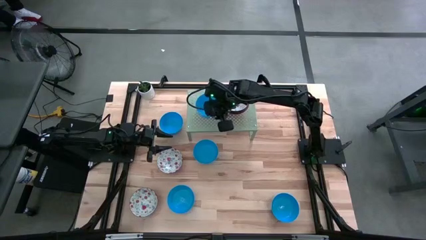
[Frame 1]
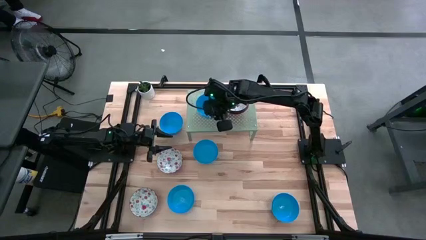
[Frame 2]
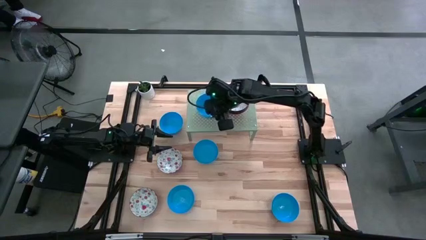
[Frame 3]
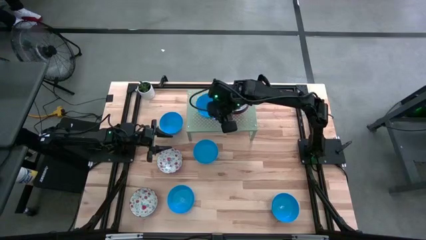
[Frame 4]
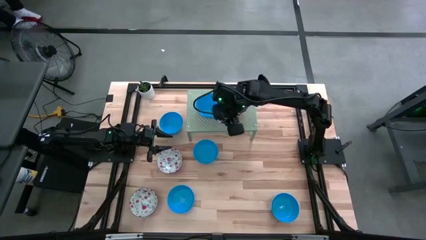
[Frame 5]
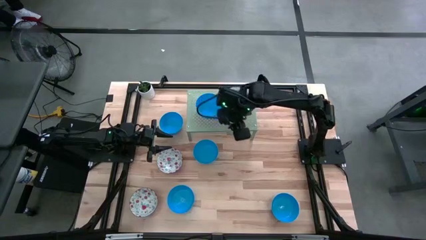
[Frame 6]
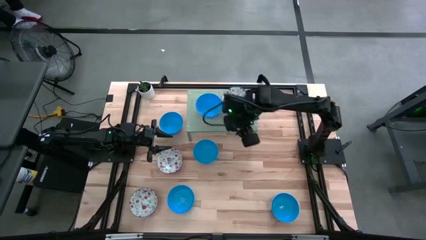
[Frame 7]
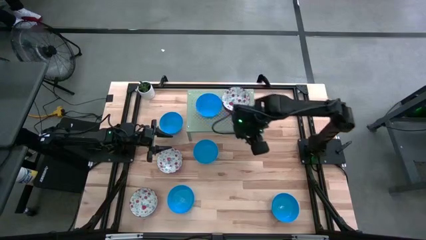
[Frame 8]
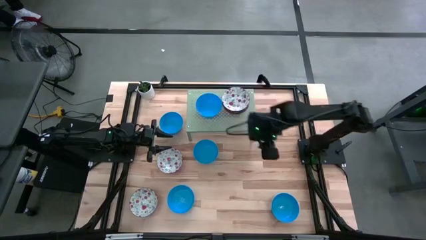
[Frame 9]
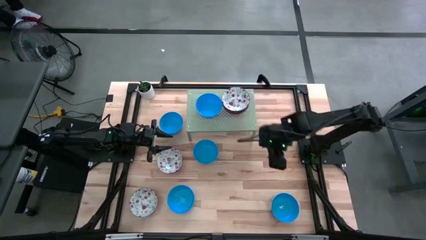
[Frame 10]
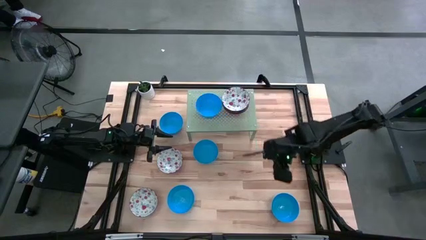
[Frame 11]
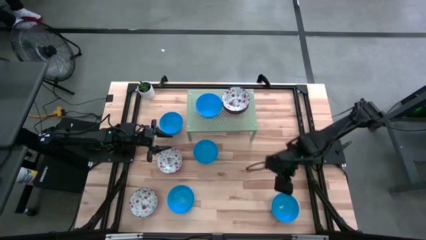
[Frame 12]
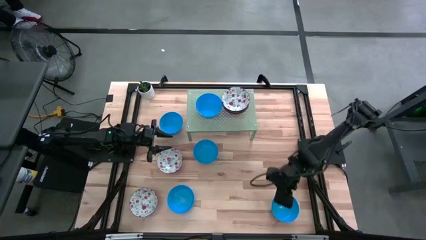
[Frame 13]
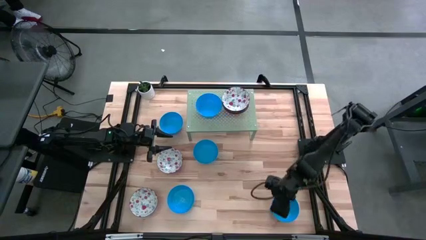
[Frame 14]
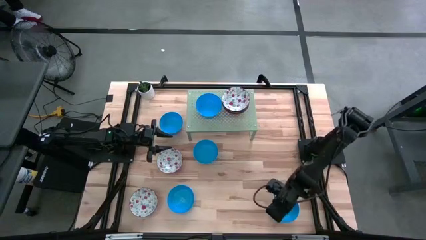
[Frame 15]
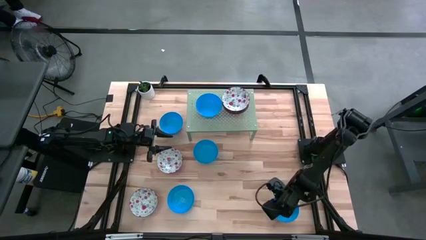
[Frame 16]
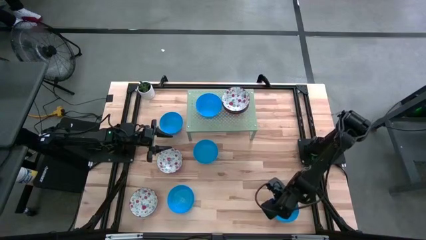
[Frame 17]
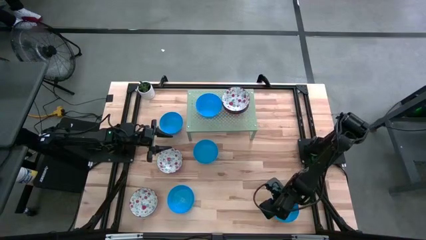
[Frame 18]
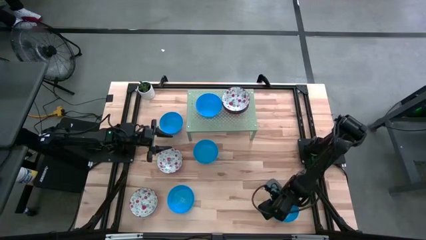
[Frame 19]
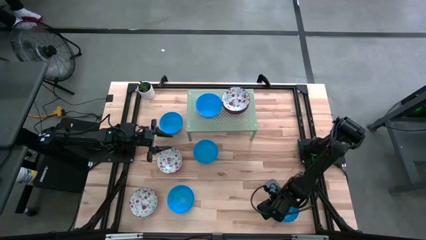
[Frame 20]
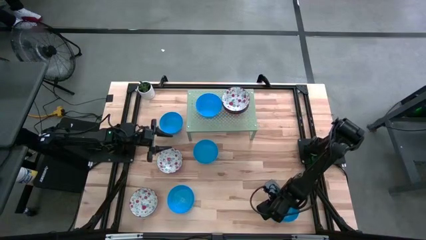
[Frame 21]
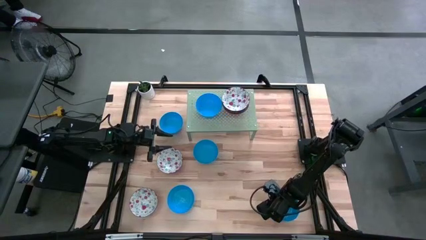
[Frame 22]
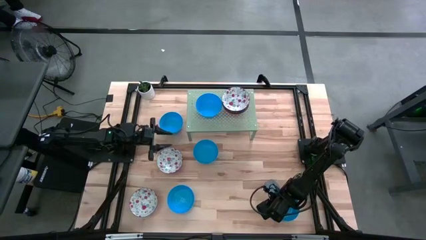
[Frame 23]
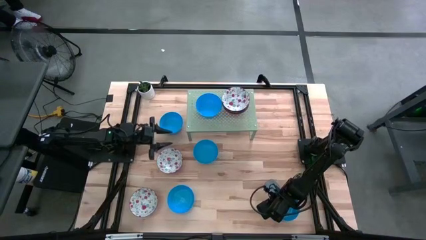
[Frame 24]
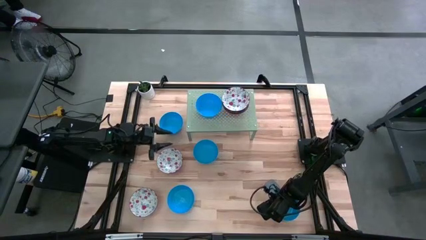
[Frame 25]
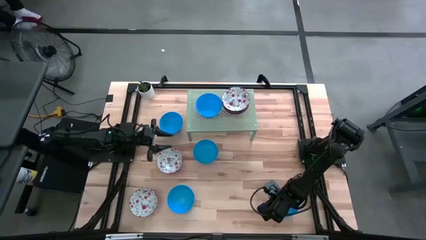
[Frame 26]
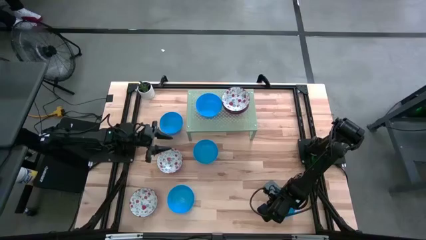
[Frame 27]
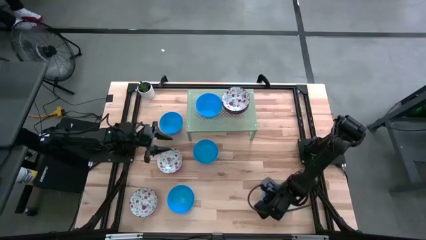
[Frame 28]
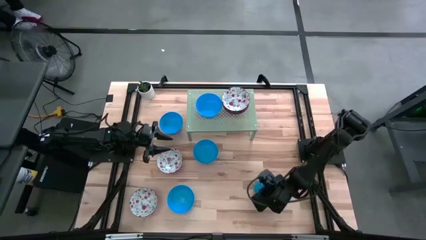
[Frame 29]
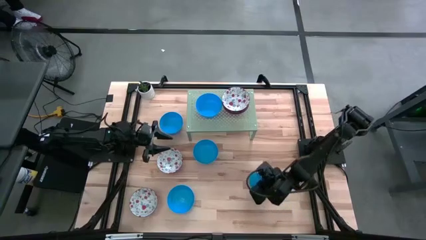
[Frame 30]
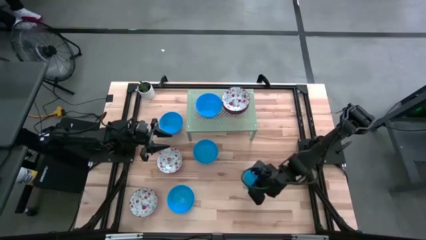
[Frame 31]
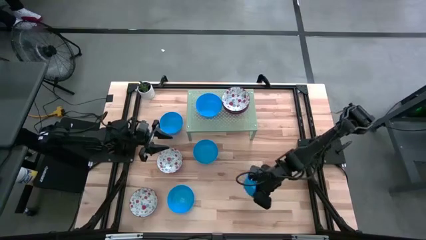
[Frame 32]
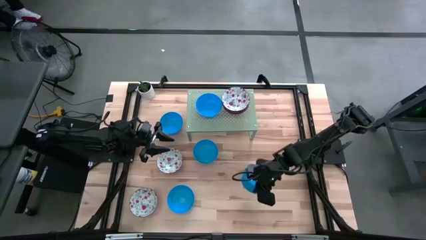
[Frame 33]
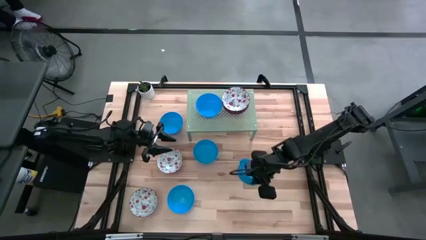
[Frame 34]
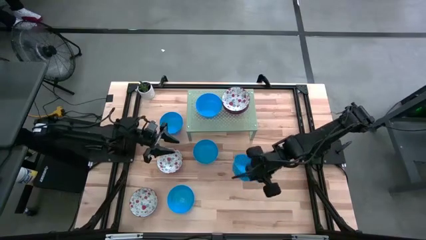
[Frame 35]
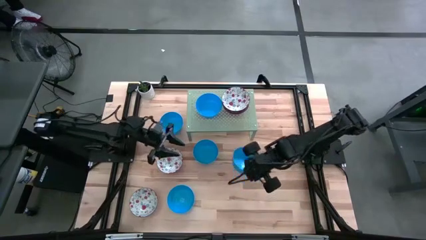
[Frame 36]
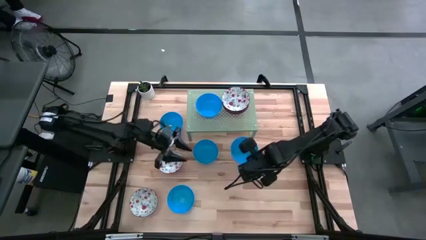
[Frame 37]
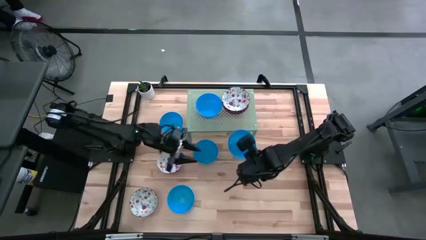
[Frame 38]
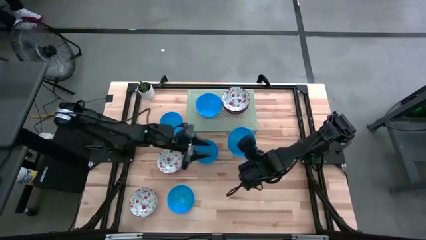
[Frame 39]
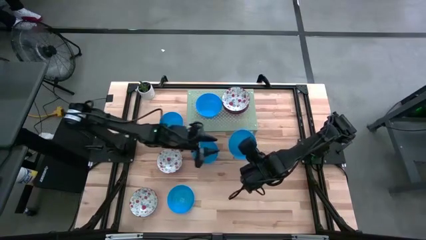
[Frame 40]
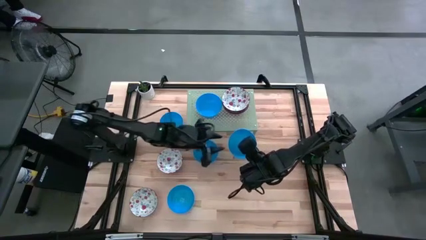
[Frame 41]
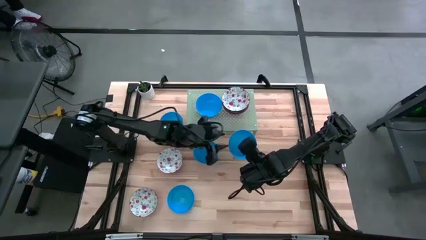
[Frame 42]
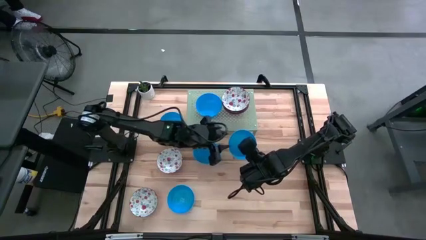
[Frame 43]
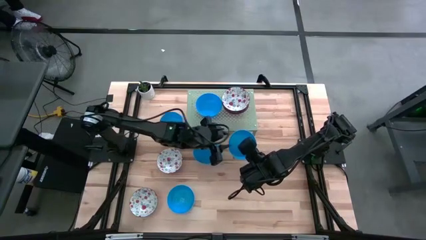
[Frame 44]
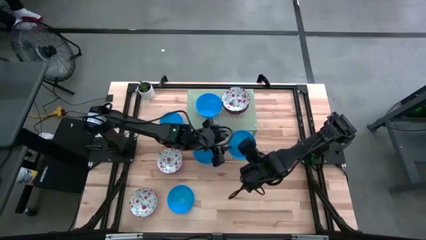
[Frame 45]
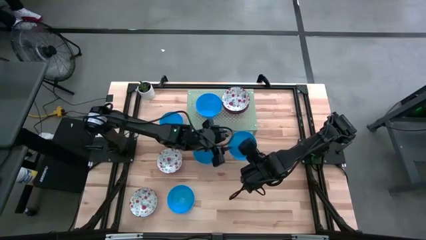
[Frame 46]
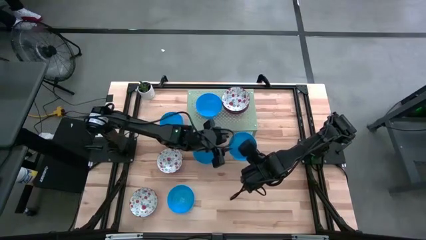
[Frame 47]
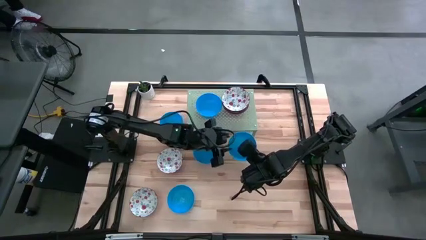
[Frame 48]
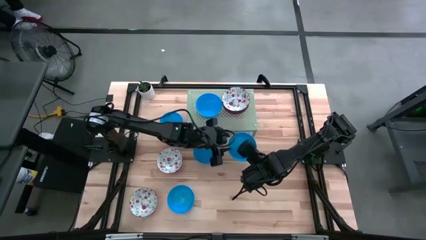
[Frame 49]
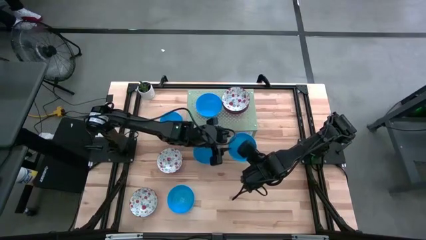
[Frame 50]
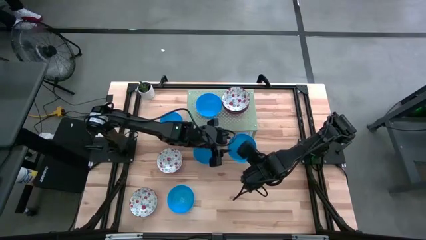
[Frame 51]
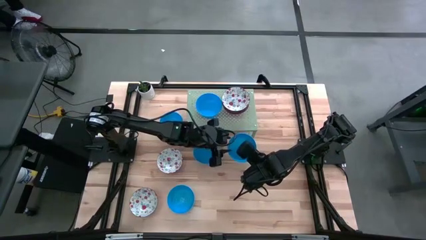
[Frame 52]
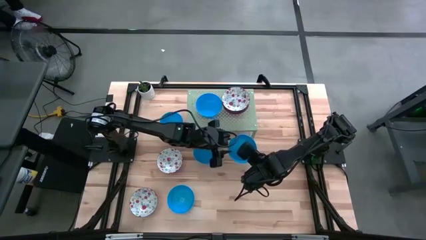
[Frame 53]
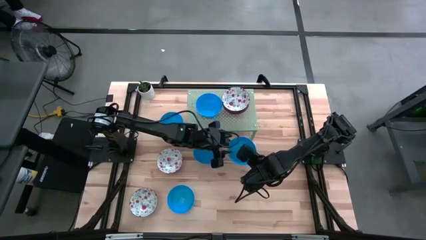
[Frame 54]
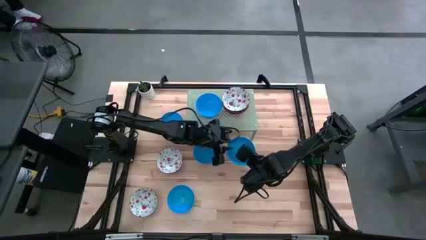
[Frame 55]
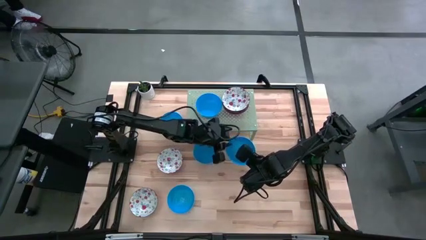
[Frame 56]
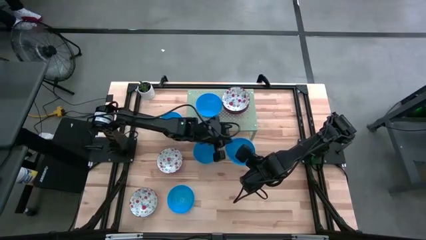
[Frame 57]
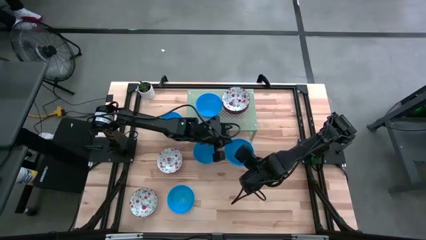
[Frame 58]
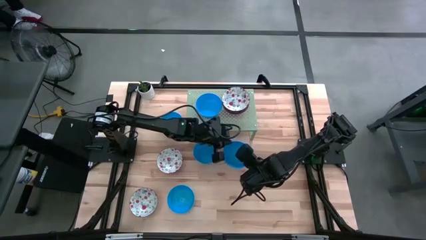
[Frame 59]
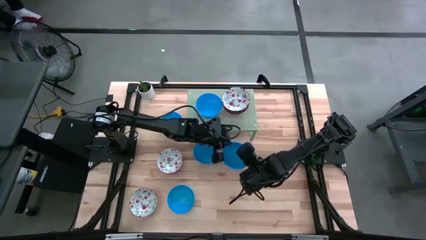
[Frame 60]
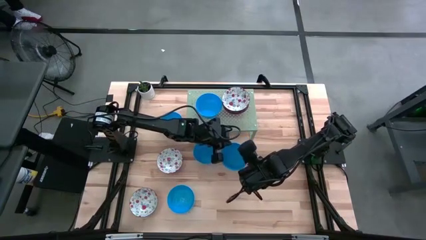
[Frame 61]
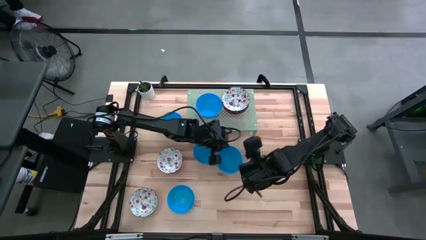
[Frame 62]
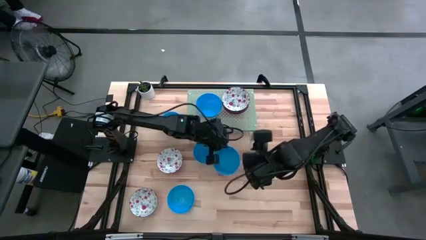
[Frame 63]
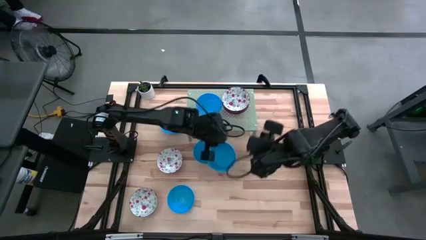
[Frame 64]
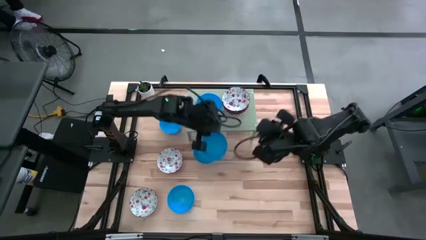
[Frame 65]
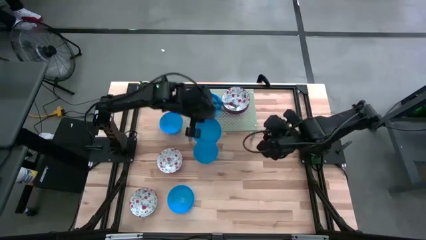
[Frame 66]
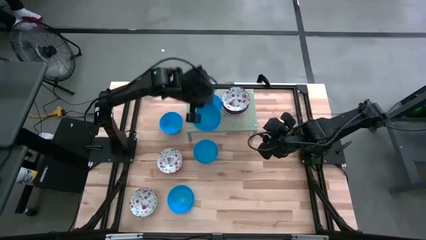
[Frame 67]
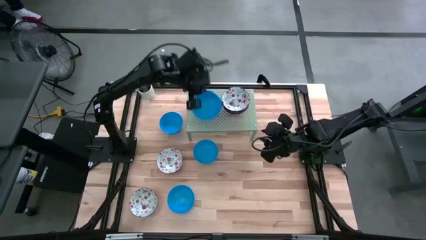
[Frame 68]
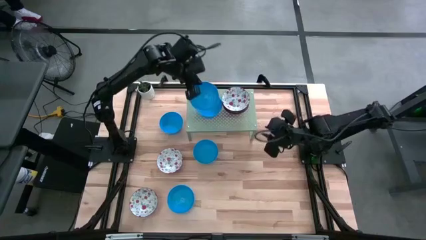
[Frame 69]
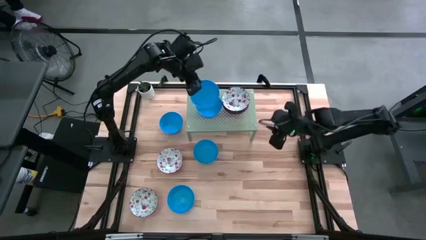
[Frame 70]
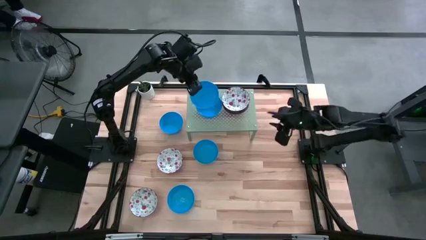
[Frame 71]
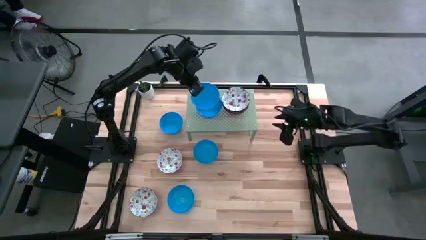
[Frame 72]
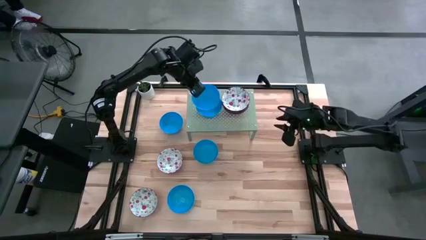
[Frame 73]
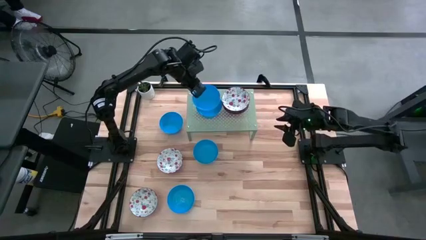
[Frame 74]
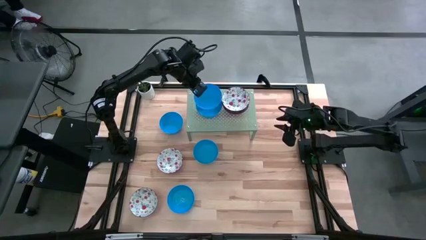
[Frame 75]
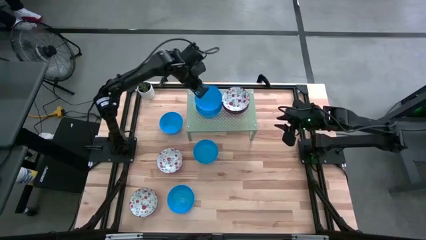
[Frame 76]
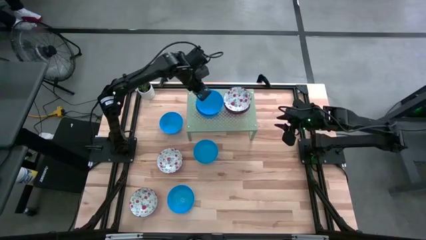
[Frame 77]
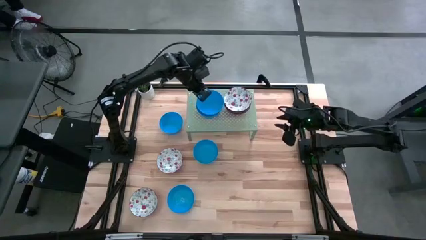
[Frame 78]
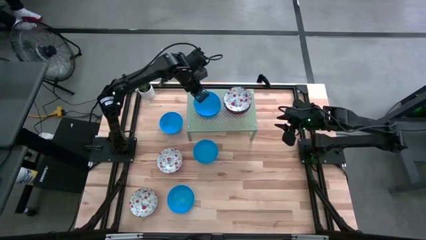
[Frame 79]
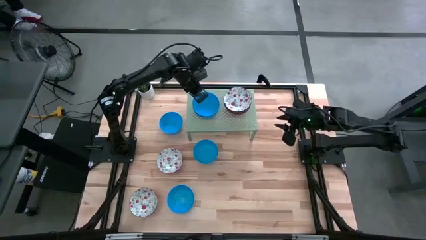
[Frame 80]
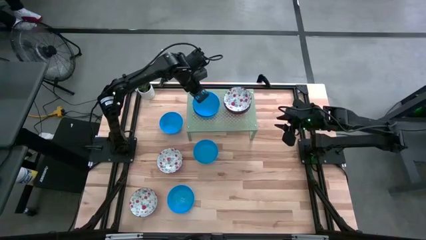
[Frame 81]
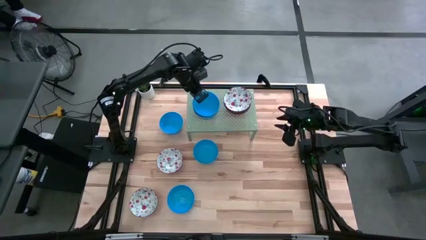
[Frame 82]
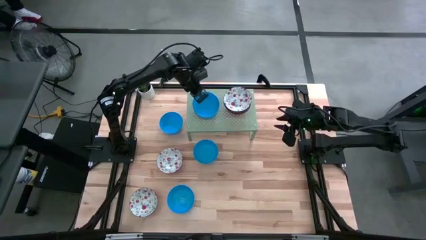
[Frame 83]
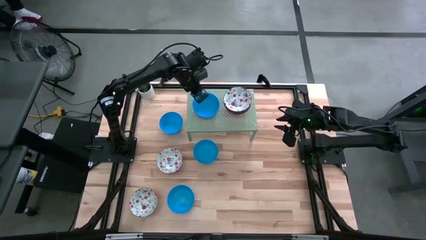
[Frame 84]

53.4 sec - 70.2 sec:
Task: Pick & Place Mini bowls
Stack the blue bowl on top of the blue bowl on the shelf
